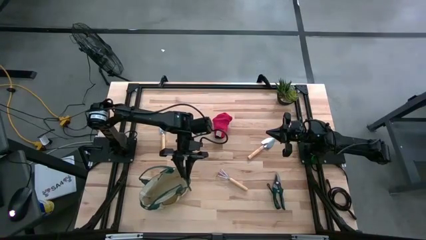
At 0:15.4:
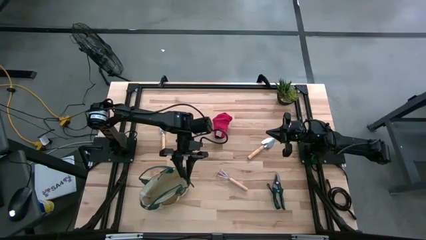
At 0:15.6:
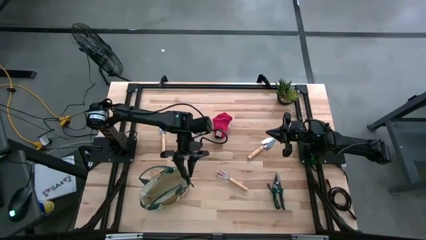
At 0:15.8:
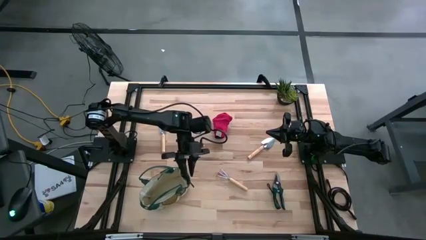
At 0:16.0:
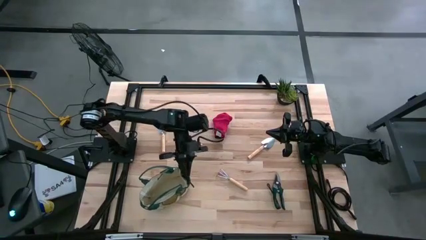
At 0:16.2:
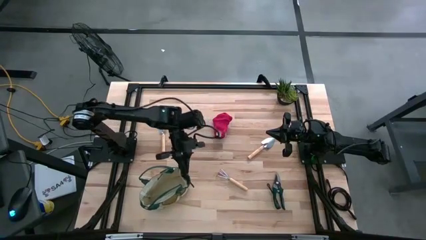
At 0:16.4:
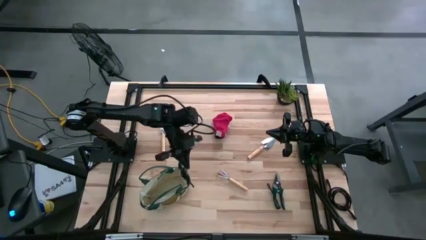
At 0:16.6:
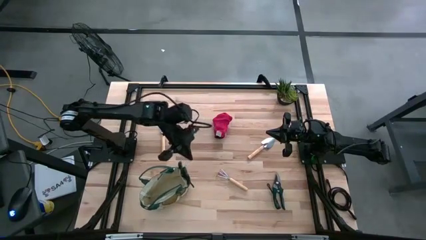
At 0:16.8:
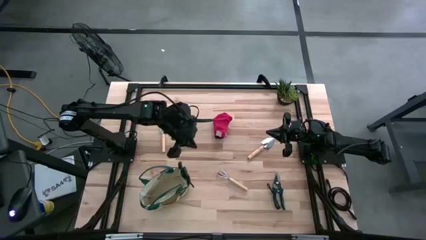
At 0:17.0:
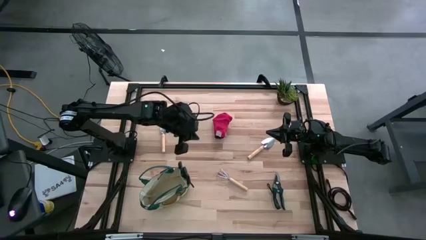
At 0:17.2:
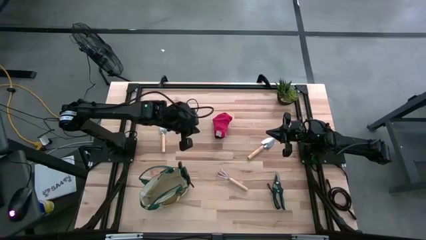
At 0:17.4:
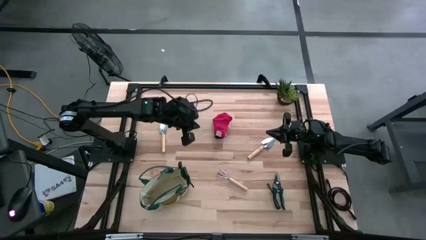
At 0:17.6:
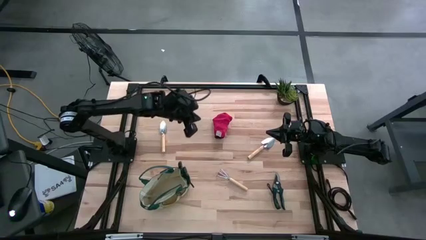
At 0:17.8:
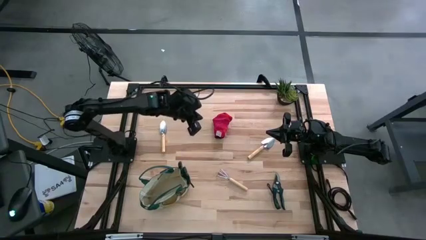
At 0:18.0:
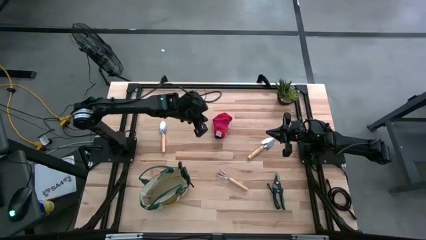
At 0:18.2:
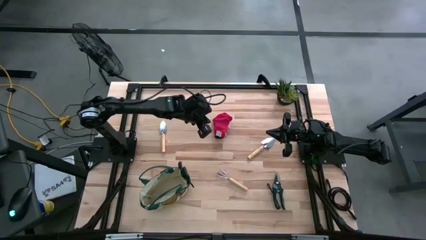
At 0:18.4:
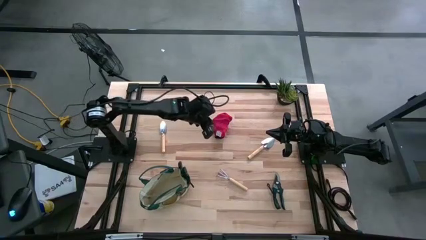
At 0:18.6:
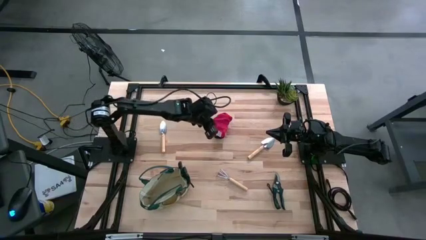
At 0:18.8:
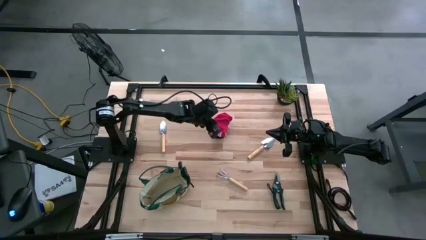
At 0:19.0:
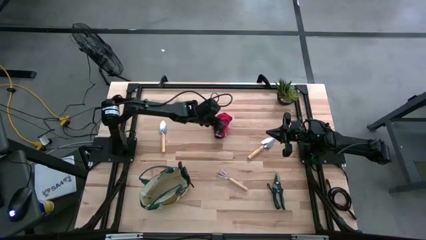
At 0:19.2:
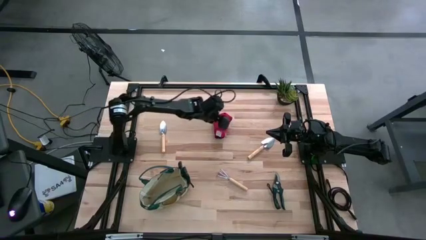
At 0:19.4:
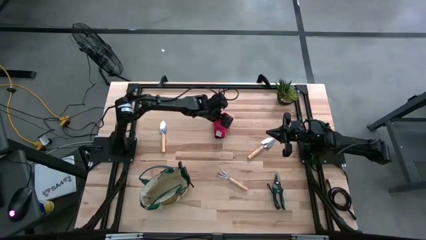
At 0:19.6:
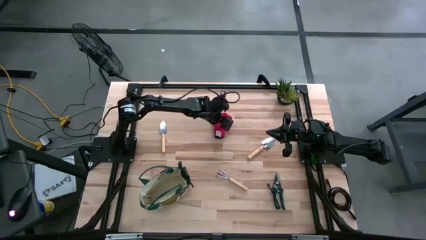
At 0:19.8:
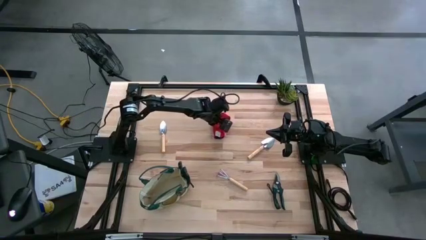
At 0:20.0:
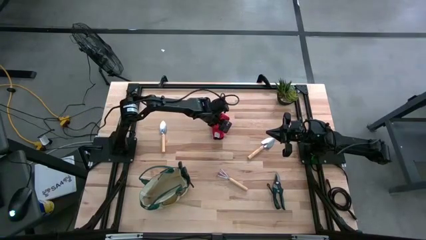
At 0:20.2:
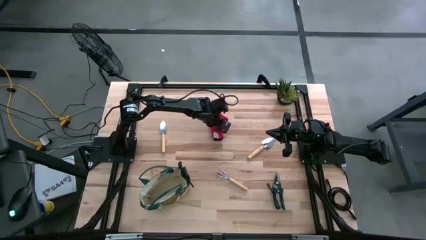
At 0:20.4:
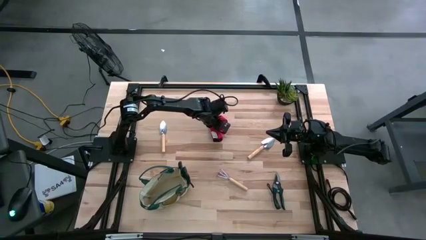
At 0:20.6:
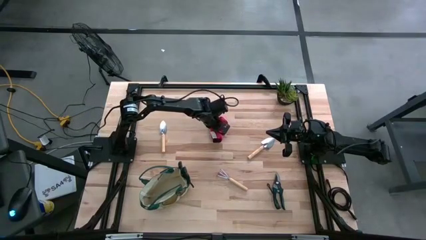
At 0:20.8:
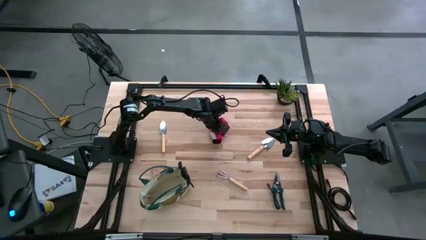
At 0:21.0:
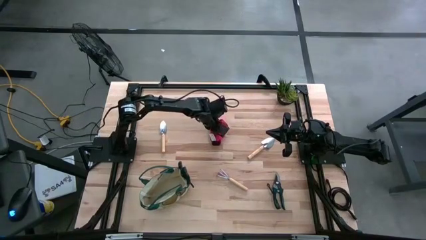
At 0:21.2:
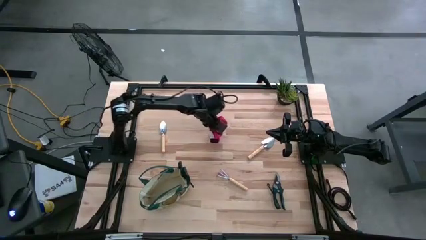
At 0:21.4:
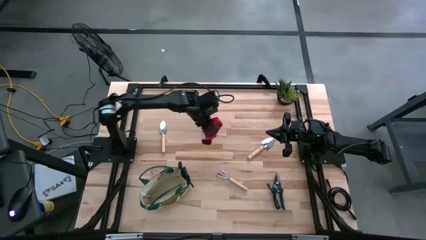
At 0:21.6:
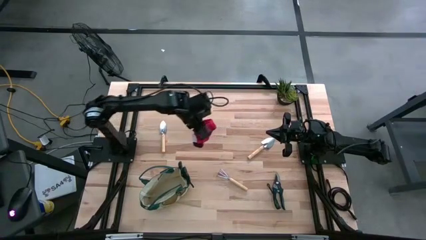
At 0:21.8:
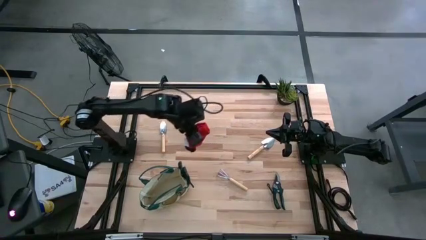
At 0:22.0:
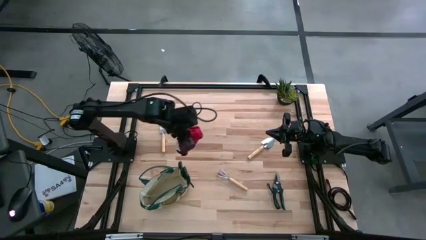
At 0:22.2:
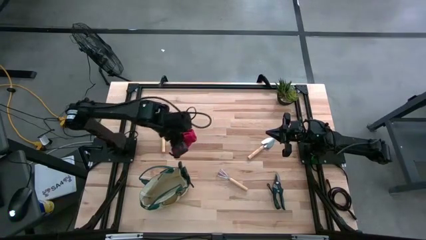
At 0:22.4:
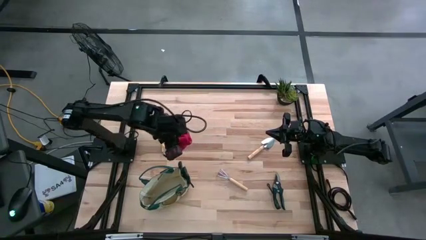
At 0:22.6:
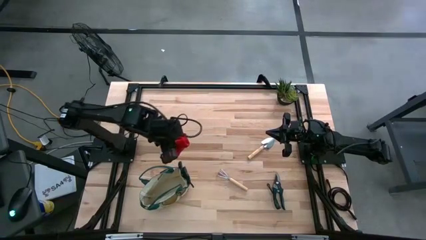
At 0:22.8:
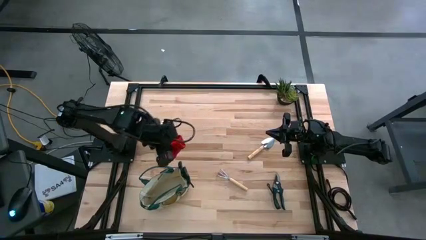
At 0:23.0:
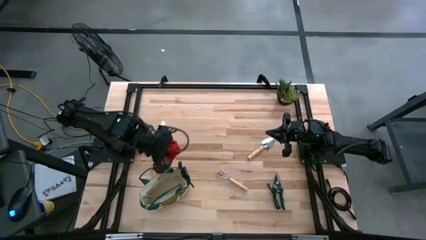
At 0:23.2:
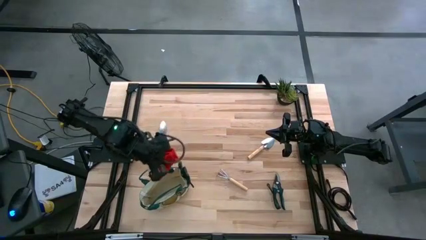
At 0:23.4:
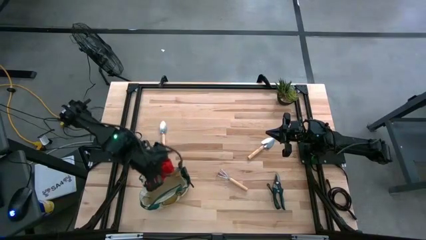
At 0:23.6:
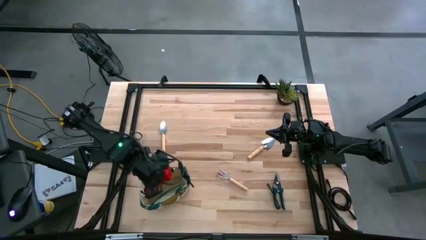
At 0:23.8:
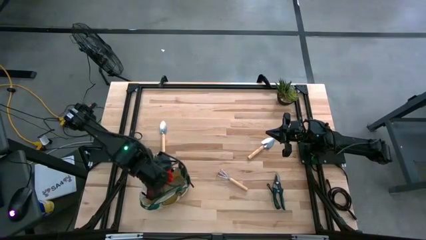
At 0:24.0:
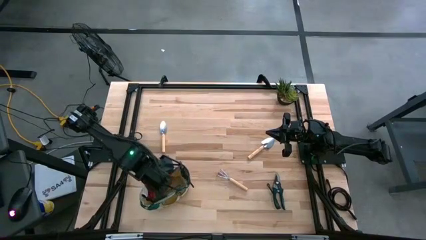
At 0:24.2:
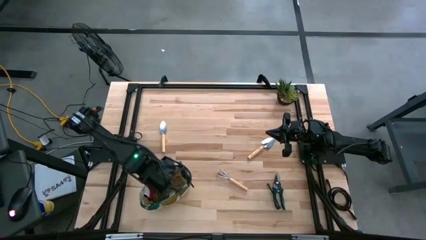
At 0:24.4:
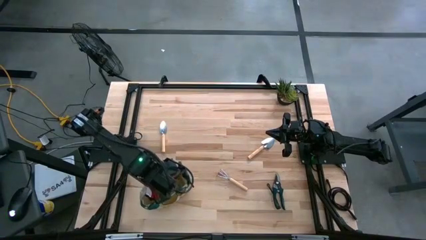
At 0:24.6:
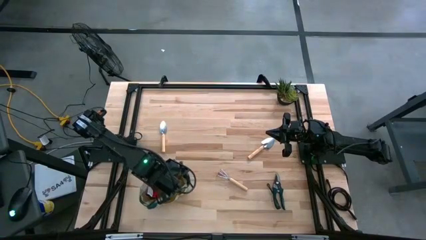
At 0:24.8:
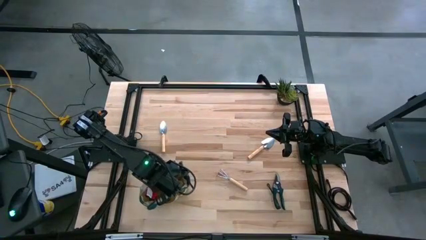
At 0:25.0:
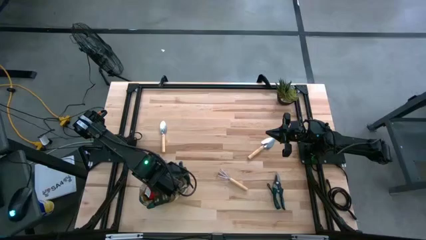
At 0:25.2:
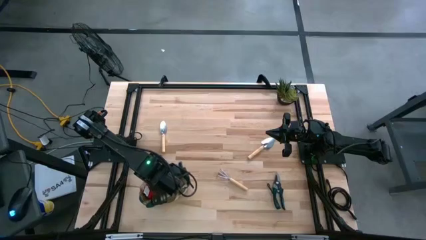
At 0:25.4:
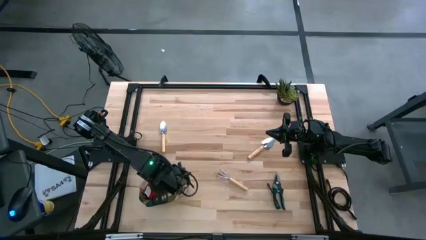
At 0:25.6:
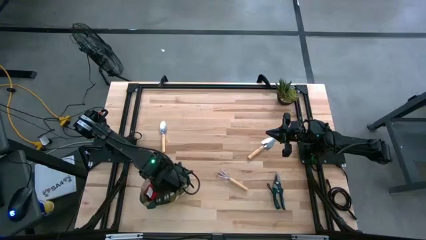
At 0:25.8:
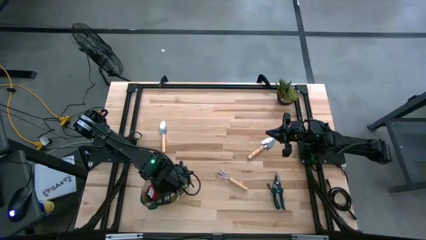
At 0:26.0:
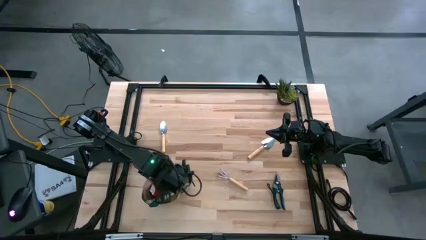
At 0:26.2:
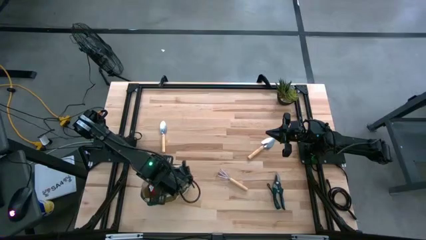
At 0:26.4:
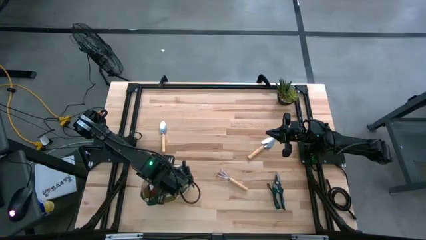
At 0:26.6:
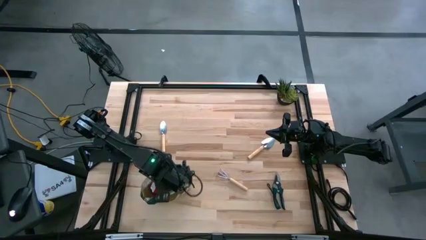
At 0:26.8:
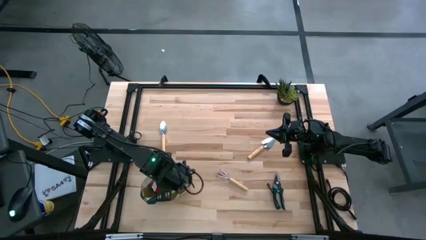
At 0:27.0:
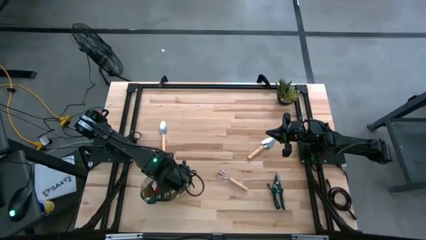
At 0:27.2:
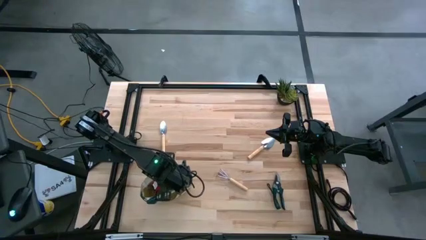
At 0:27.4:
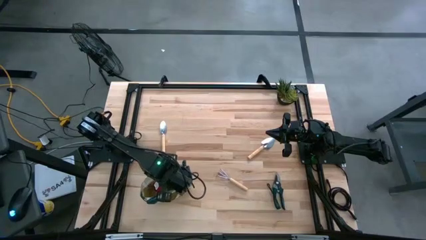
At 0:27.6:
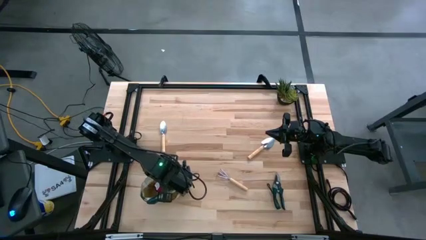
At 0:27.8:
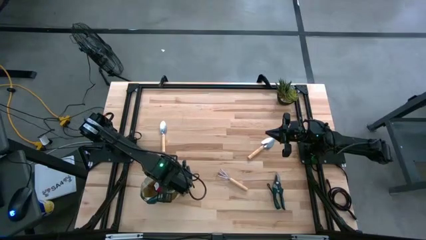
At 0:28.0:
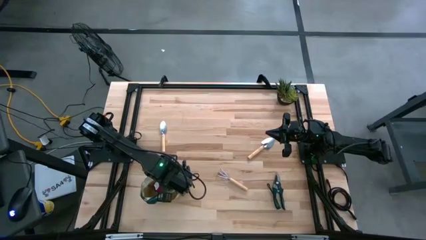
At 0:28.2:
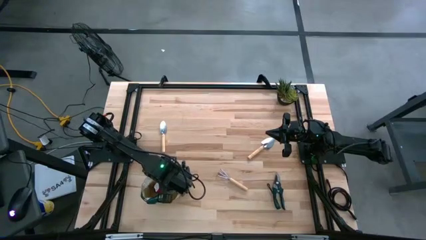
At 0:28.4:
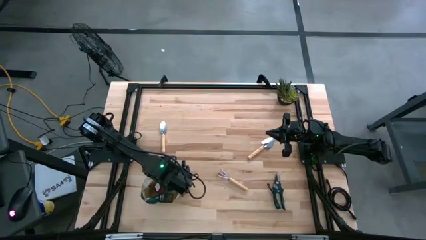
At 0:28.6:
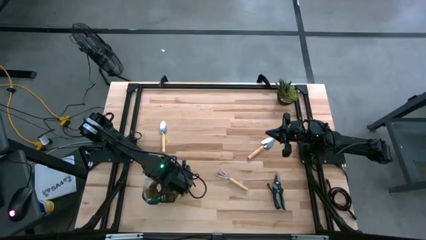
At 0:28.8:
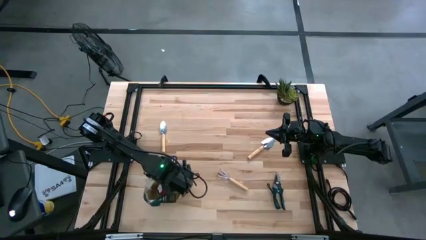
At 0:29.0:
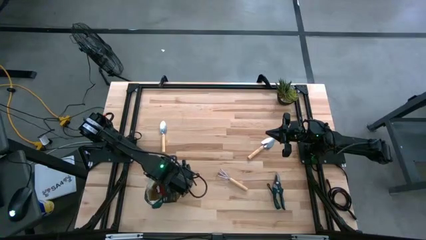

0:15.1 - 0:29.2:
Task: Pick & Place Garden tools in Gardening bag
Put the gloves into the gardening bag

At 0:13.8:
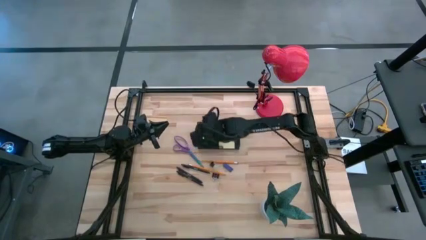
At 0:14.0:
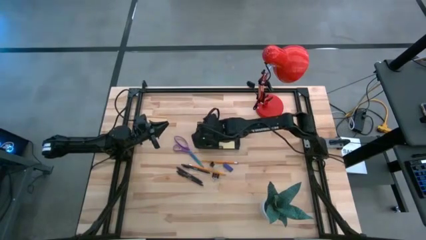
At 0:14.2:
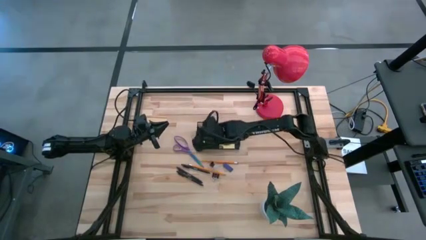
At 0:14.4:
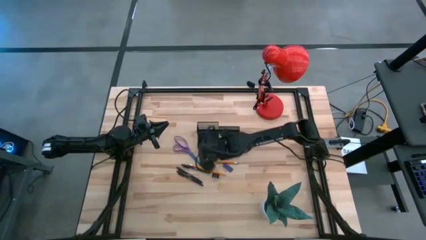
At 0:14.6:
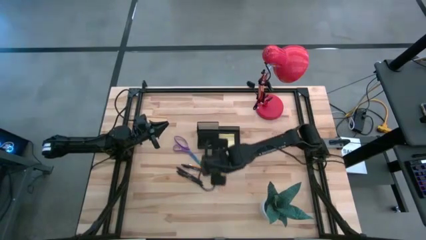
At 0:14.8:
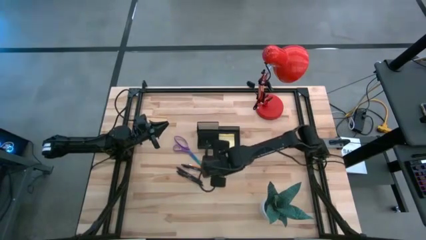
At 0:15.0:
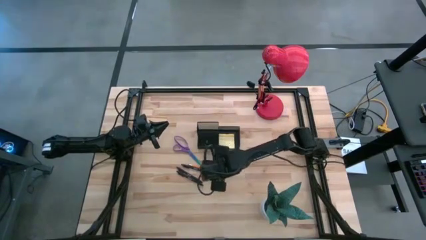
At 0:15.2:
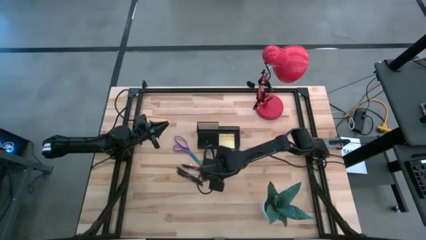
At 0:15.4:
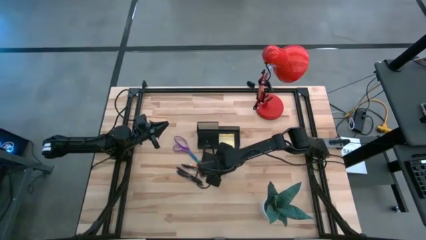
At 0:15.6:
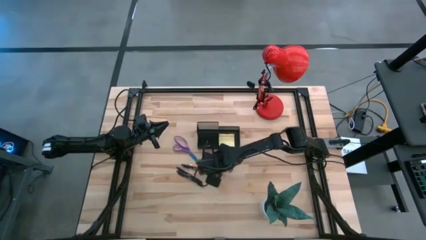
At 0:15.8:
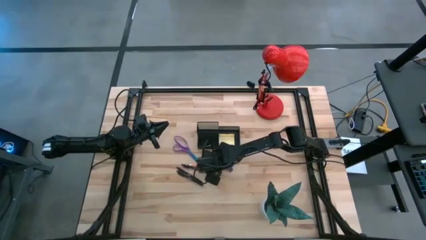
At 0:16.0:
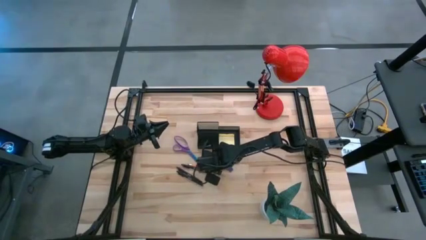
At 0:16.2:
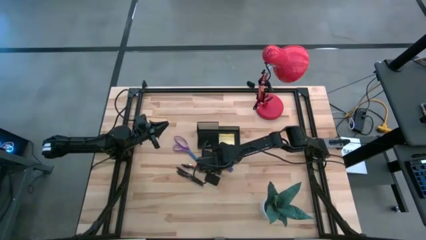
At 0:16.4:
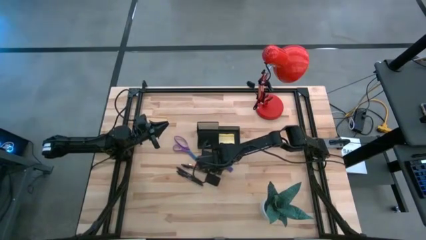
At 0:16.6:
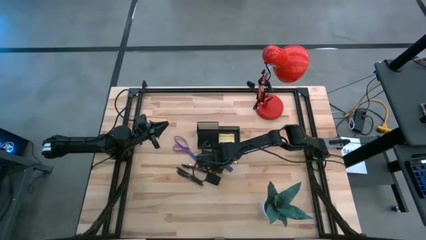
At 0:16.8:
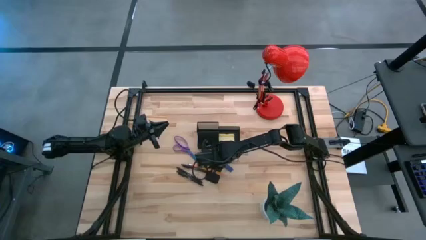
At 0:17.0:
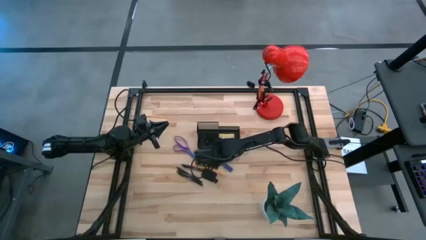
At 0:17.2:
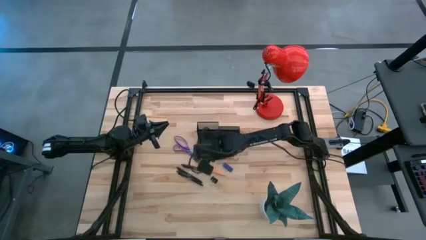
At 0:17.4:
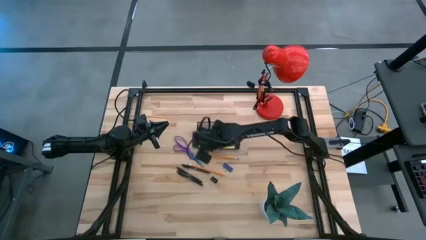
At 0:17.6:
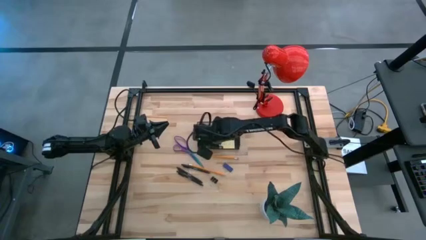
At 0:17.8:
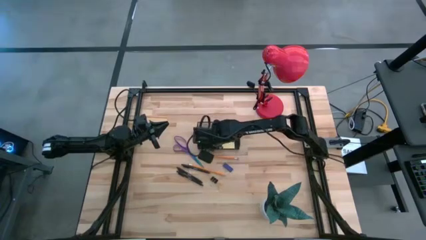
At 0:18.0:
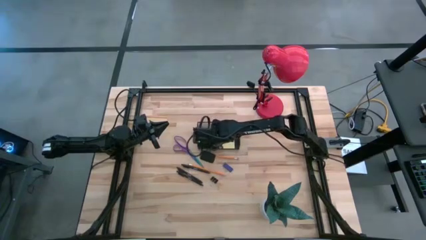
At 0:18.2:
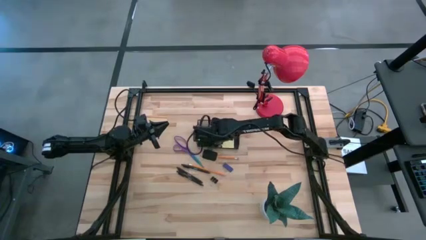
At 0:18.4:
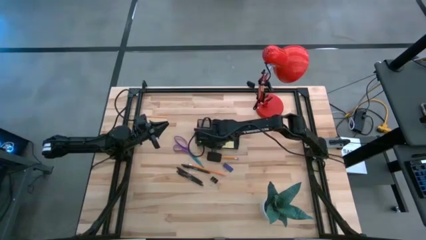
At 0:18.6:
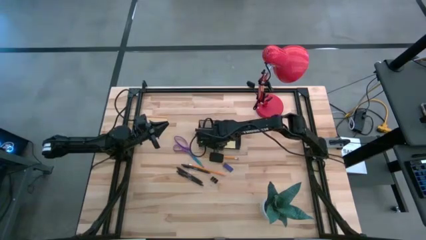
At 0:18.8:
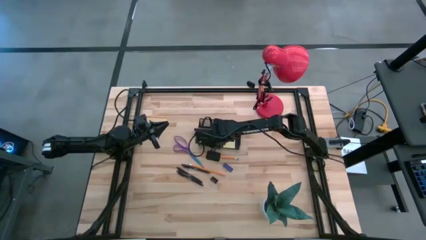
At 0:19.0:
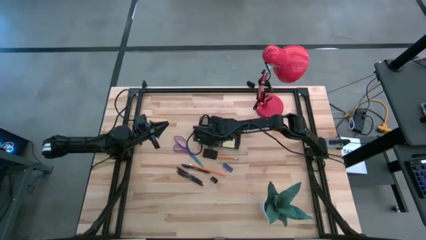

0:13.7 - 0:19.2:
Task: Pick and place office supplies into organizer
Put the top black binder clip into the black desk organizer
